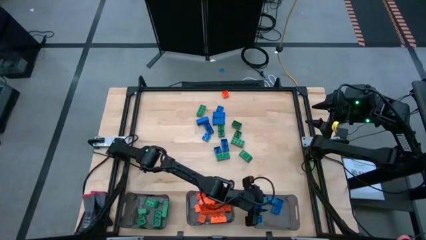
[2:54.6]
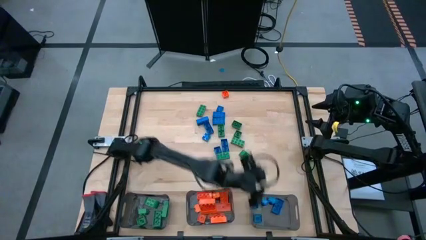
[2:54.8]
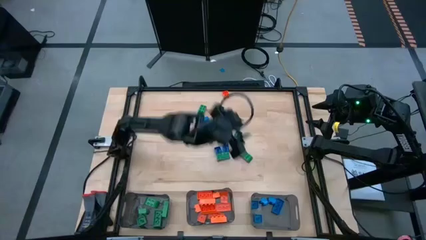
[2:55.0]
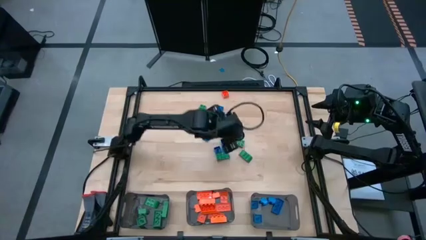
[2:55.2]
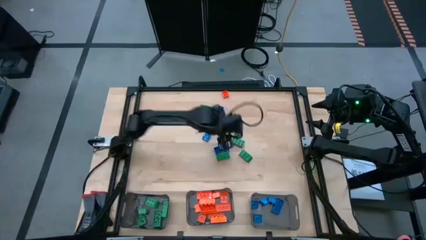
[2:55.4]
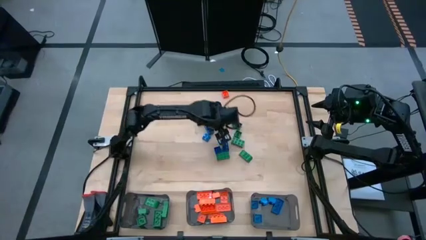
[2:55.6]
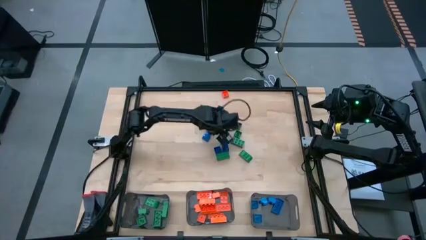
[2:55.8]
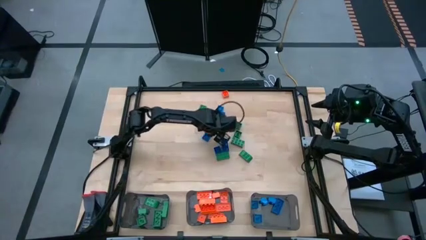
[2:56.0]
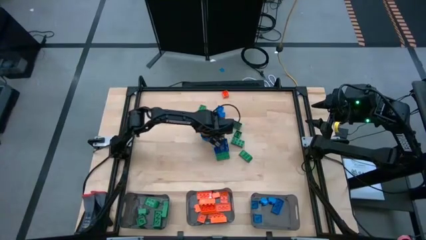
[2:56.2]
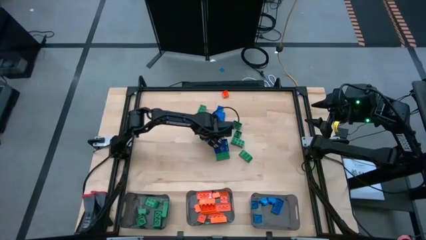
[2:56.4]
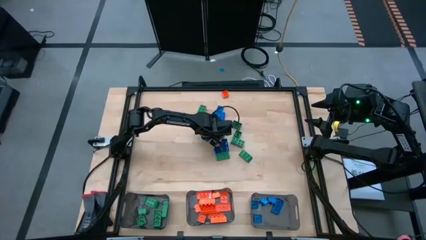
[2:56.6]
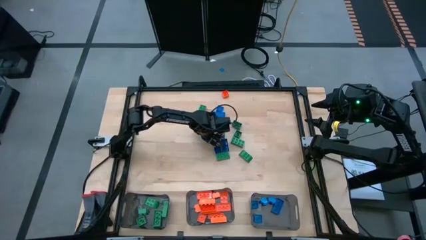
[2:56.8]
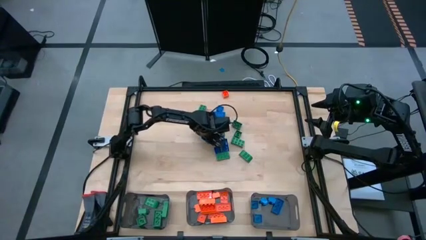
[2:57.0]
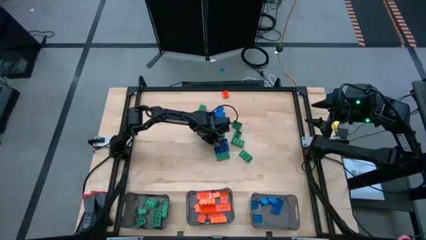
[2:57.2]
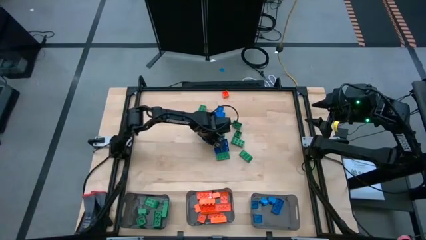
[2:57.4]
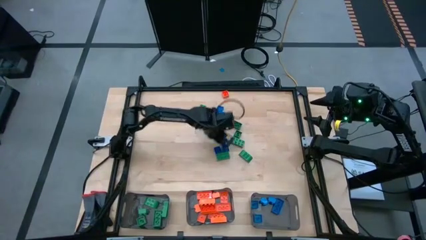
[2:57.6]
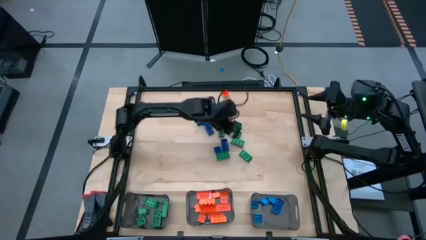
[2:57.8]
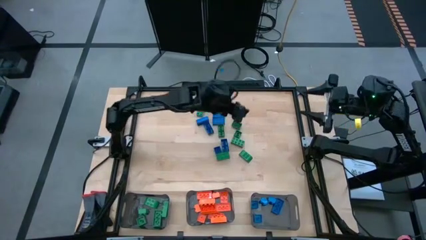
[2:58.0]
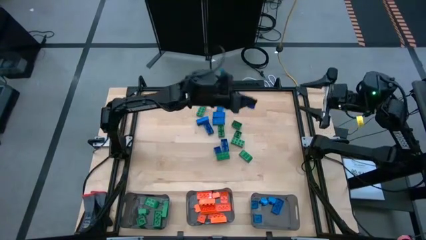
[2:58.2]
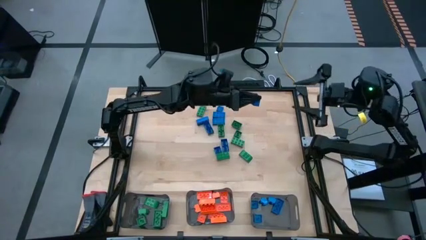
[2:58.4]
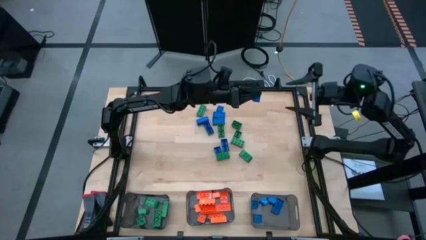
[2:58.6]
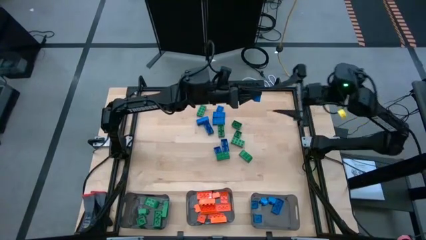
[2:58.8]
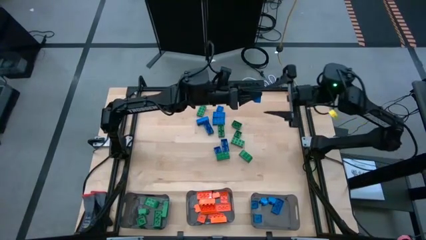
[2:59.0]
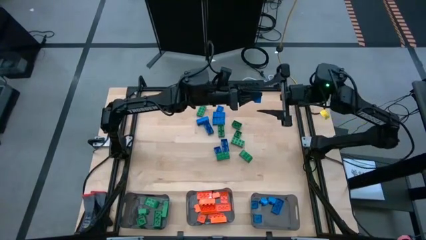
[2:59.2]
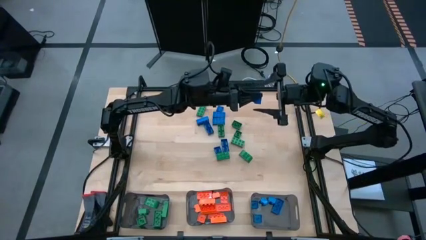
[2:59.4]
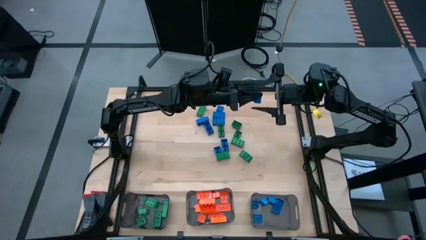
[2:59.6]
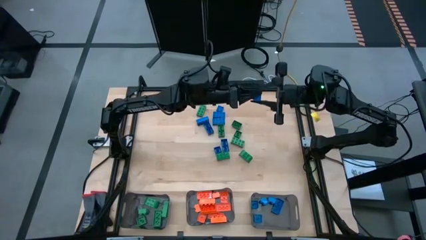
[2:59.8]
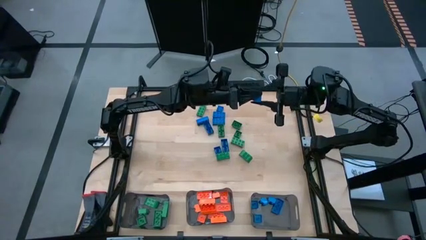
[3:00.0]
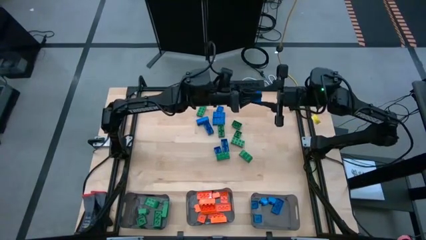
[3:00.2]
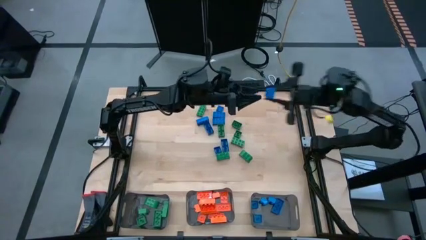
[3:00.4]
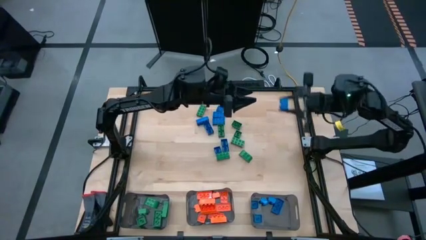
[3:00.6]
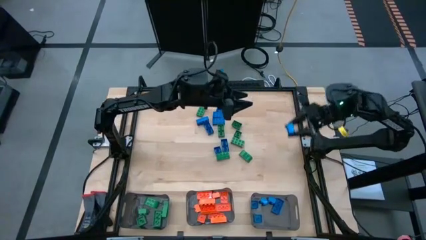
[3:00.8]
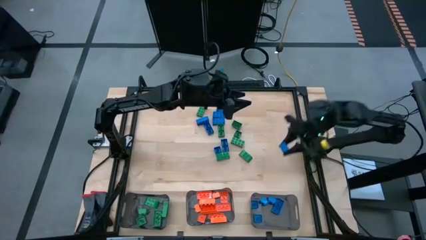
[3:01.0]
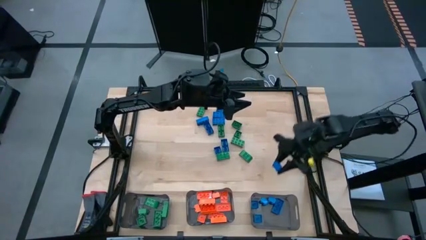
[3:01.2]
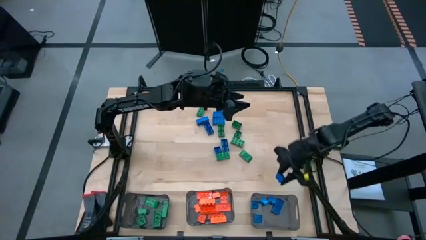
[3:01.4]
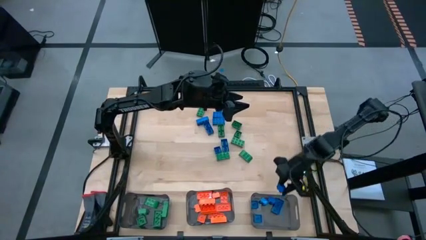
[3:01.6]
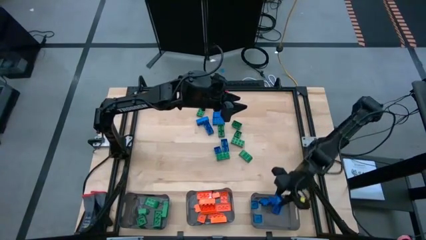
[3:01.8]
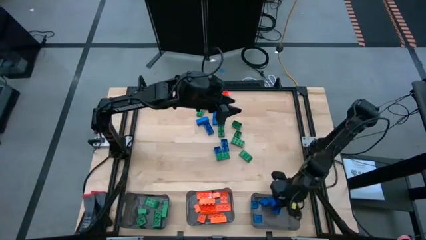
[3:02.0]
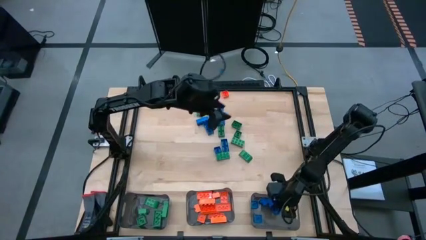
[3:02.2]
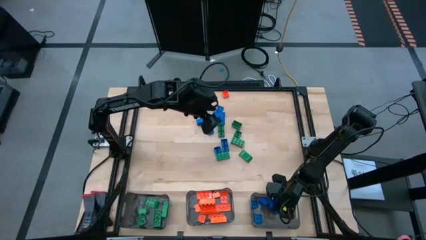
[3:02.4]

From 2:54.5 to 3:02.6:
Task: Sort blocks
Put the blue game piece into the right black bin

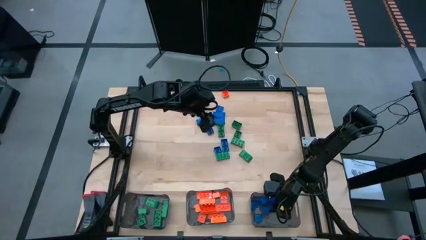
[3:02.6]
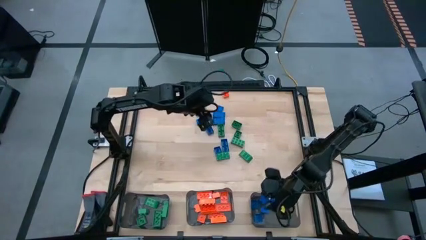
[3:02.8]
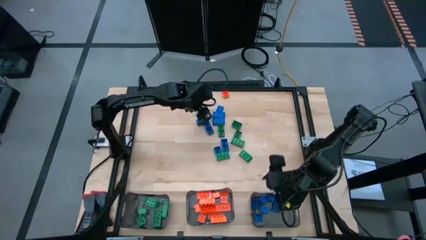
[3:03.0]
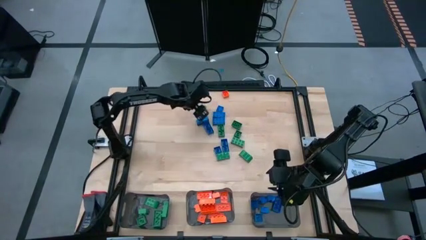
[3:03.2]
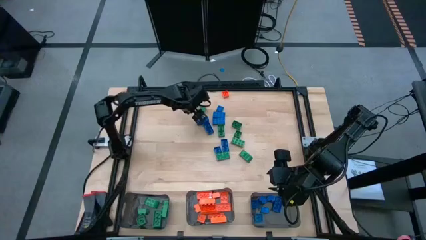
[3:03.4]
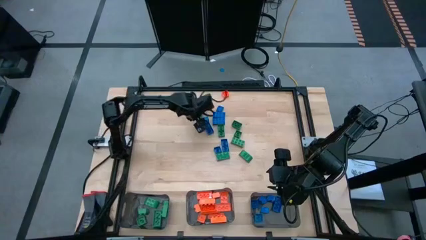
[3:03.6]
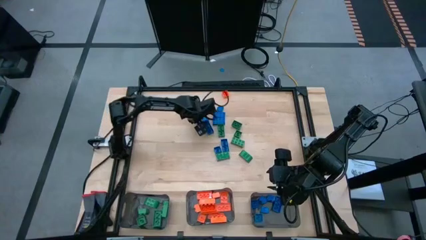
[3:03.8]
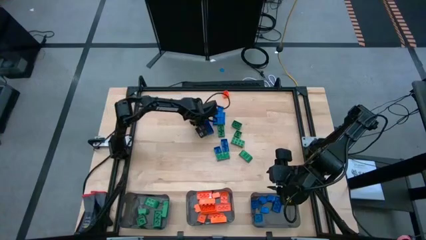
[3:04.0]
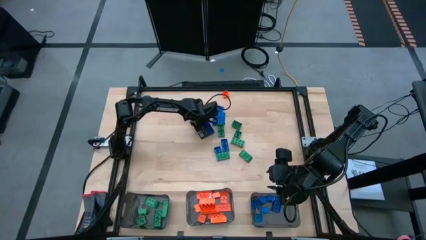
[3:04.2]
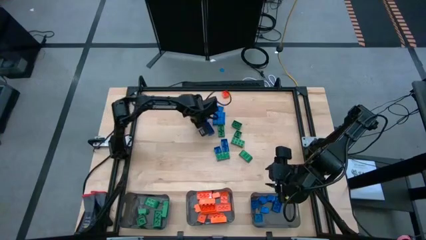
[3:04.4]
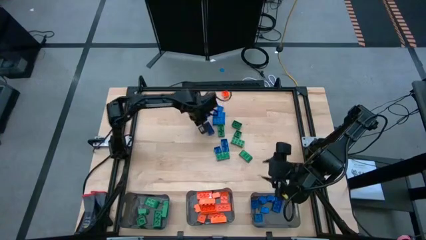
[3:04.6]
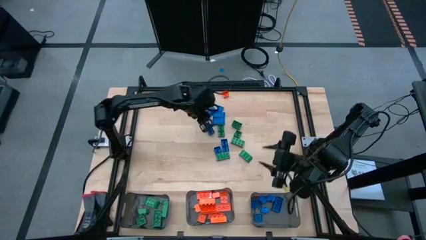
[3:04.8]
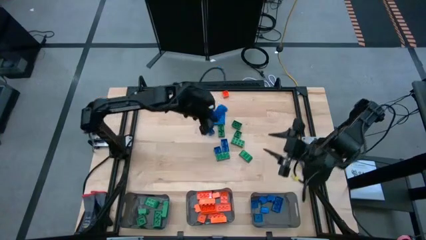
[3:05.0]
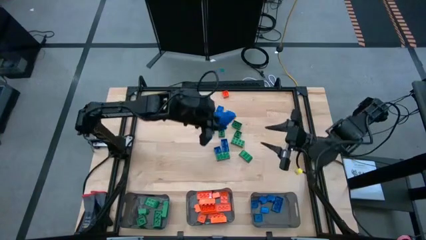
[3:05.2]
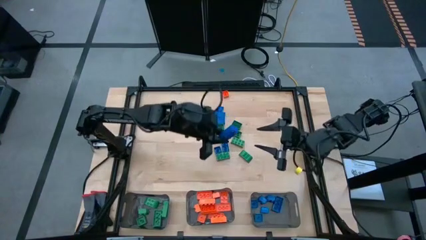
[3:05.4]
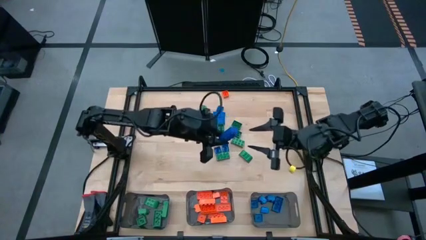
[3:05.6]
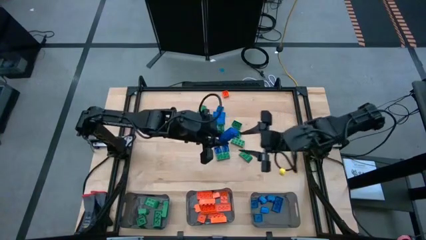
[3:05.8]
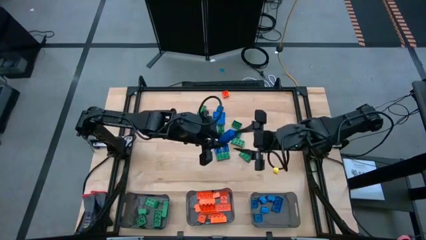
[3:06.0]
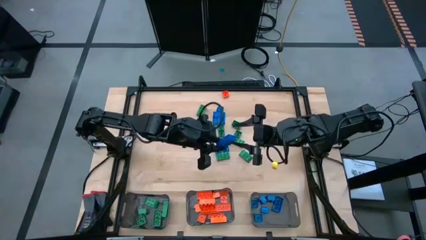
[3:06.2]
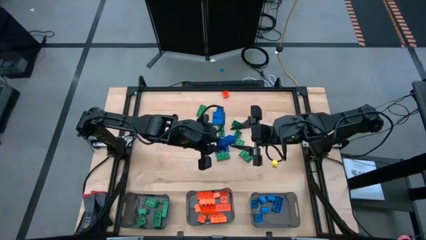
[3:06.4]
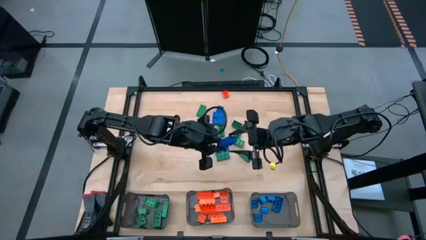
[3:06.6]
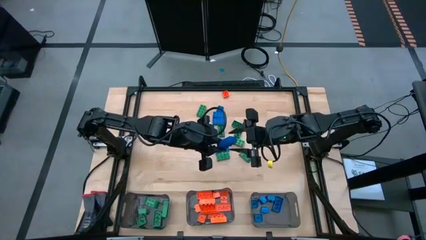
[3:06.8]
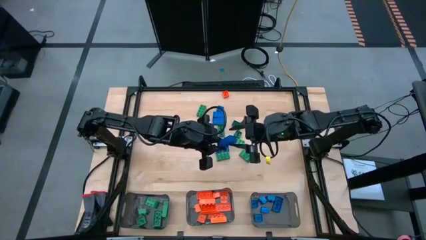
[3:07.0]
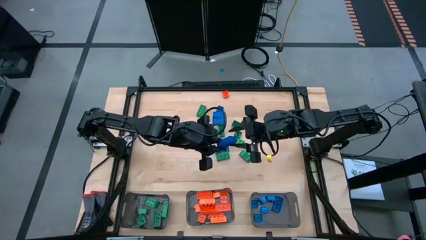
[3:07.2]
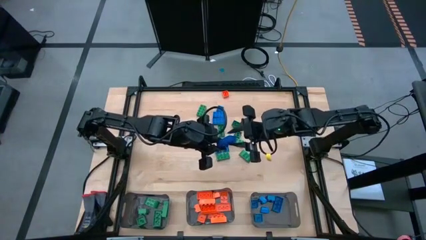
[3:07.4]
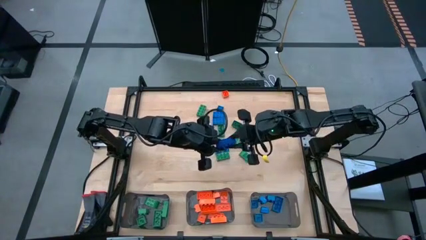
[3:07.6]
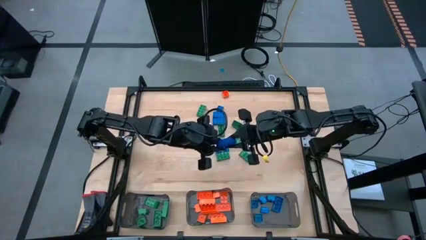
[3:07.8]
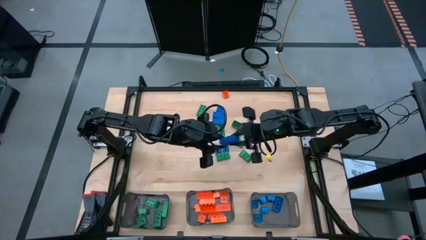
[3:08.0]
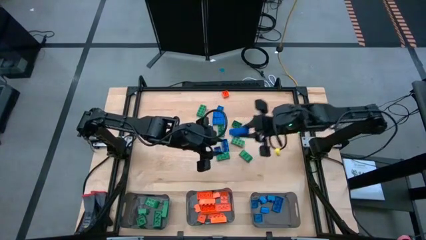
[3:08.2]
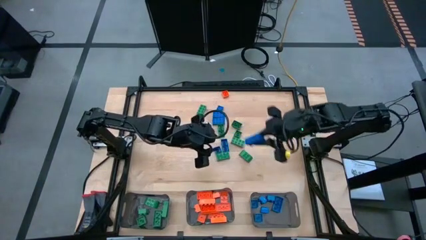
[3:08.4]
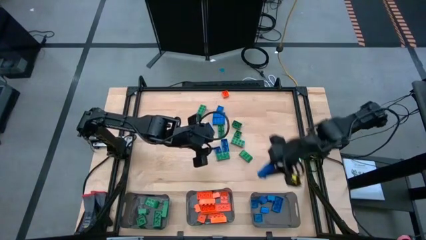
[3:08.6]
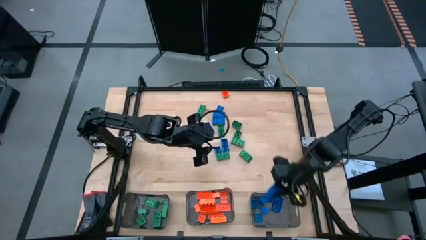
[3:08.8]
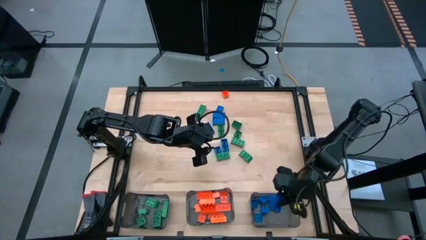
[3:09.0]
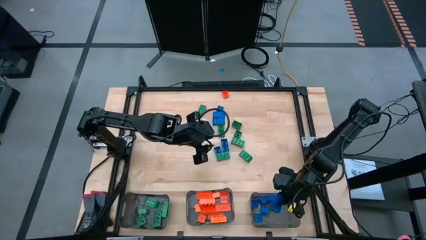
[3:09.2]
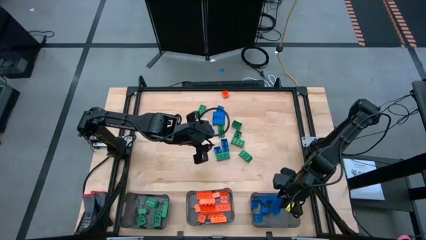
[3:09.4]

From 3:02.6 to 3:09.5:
Put the blue game piece into the right black bin
